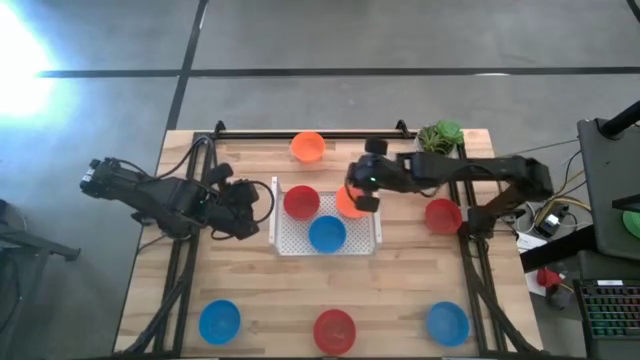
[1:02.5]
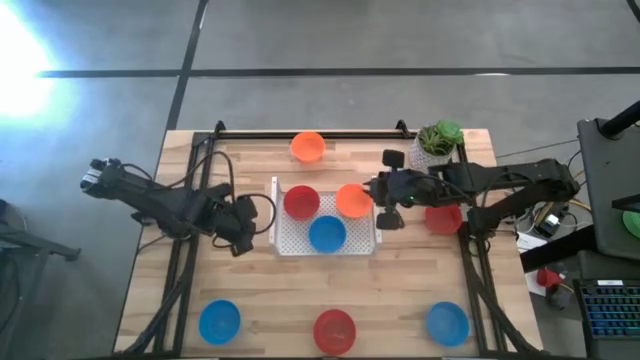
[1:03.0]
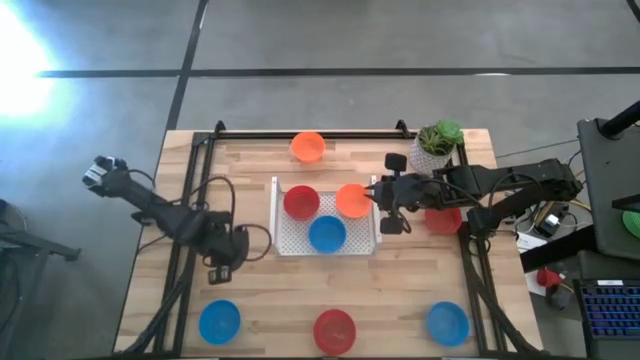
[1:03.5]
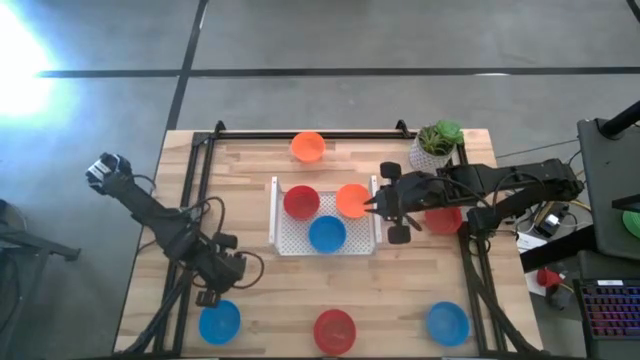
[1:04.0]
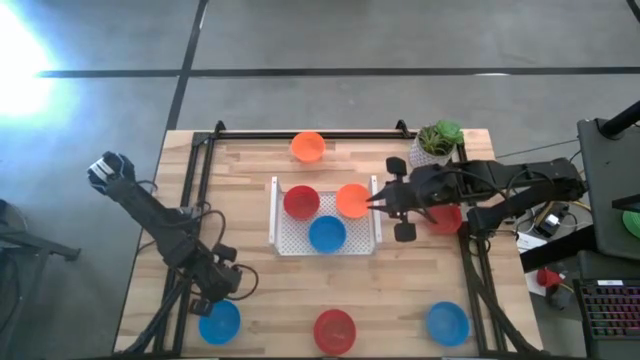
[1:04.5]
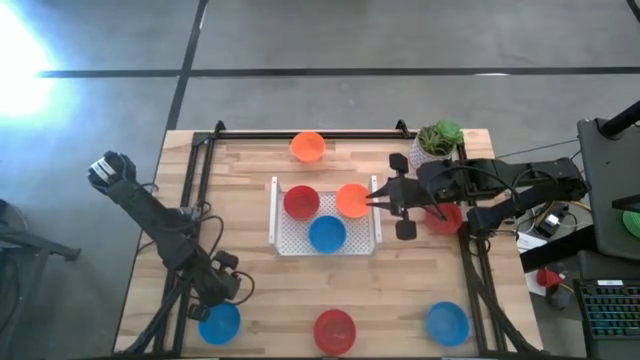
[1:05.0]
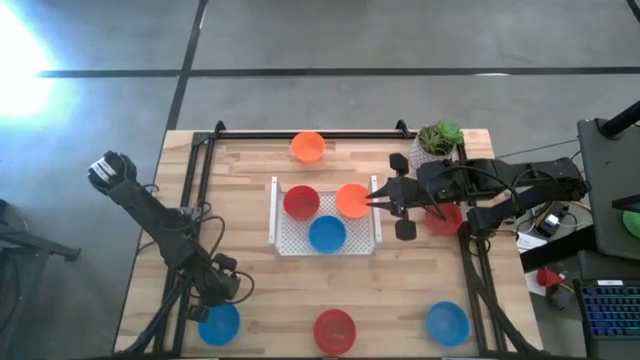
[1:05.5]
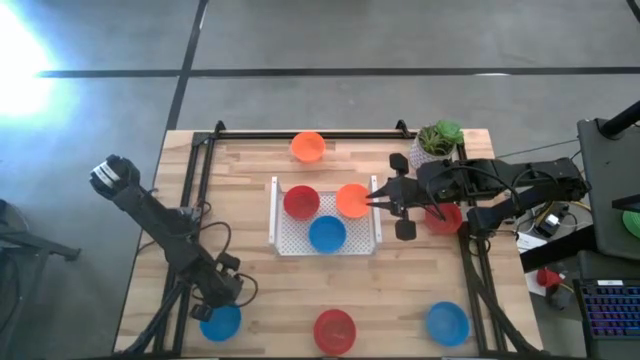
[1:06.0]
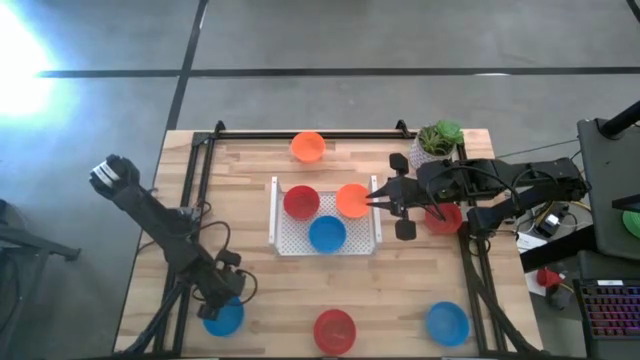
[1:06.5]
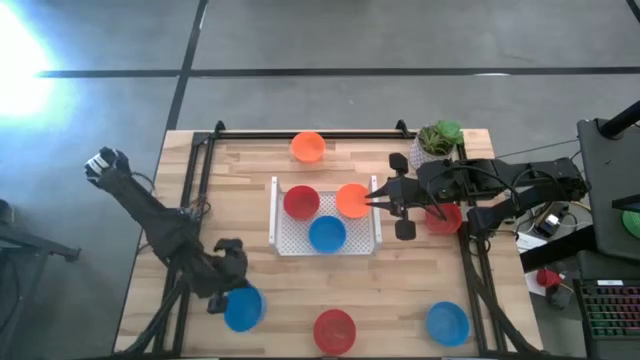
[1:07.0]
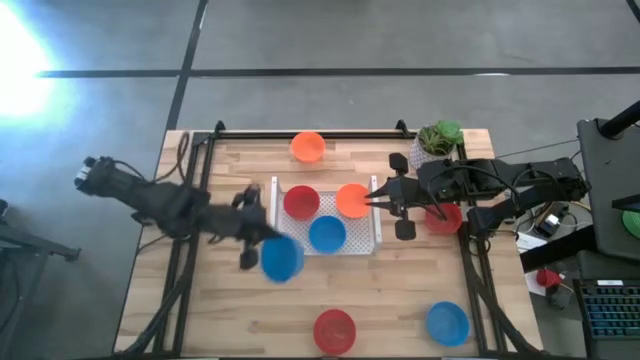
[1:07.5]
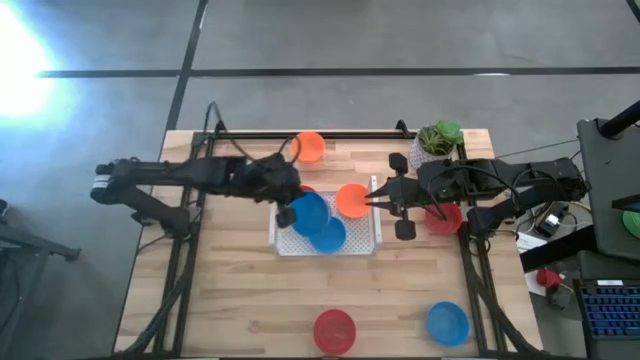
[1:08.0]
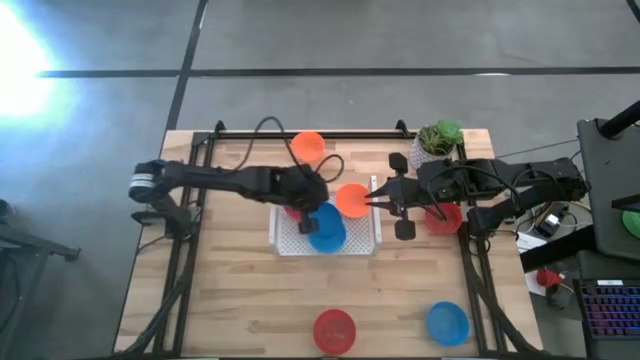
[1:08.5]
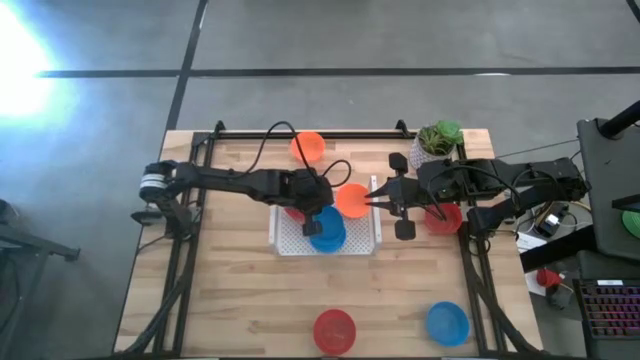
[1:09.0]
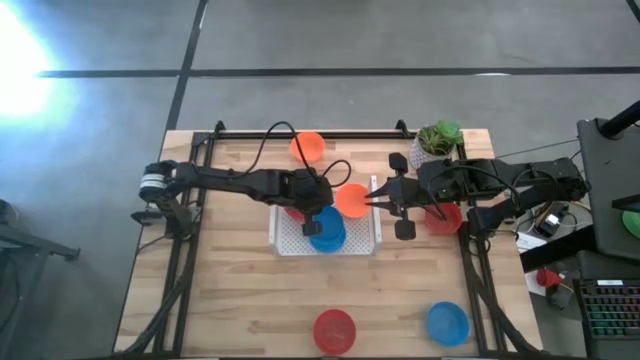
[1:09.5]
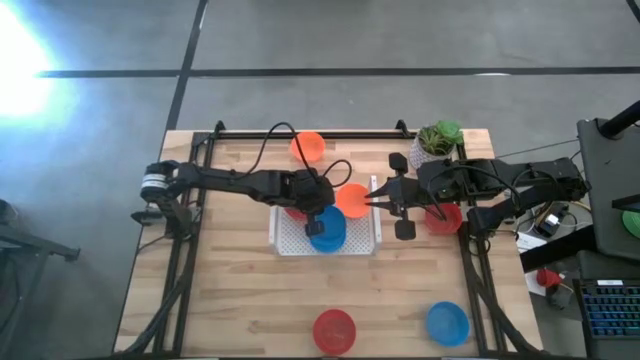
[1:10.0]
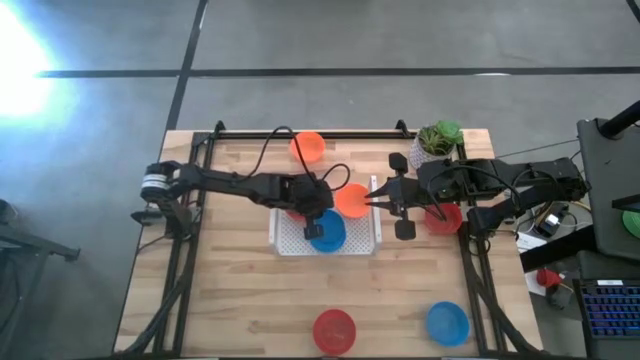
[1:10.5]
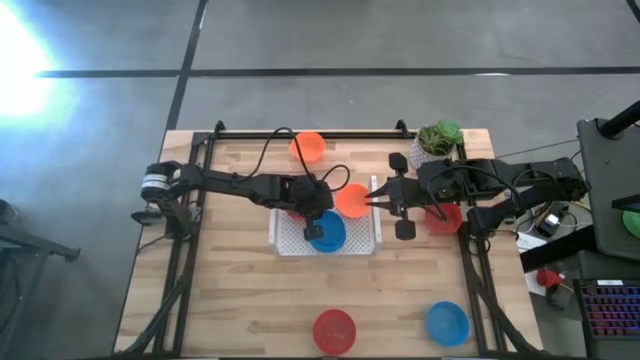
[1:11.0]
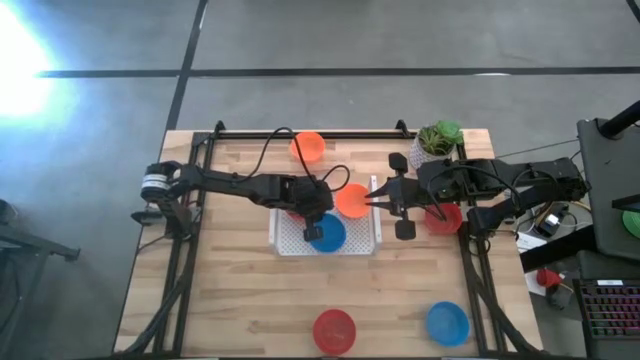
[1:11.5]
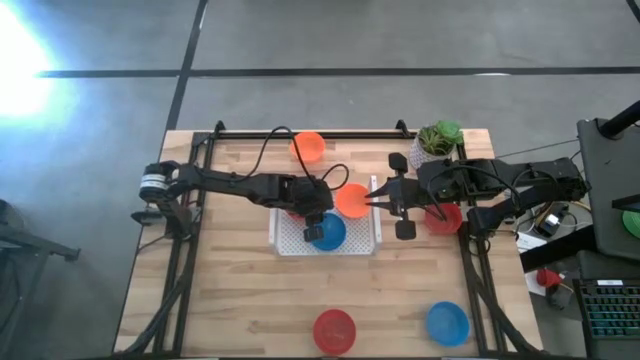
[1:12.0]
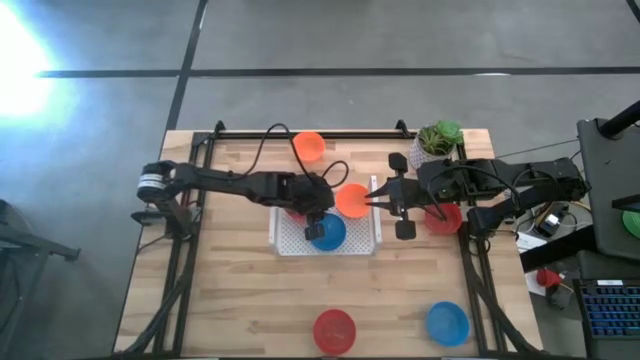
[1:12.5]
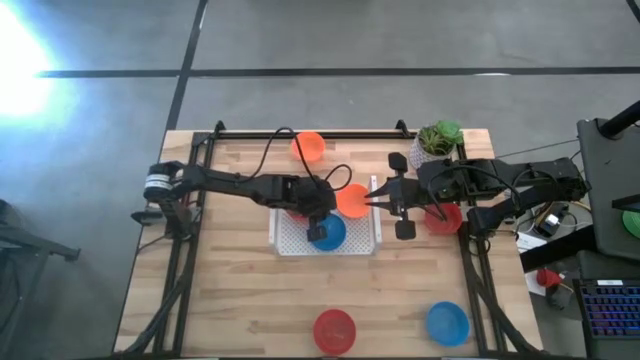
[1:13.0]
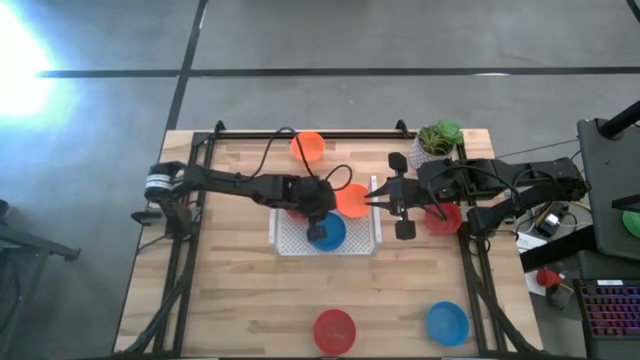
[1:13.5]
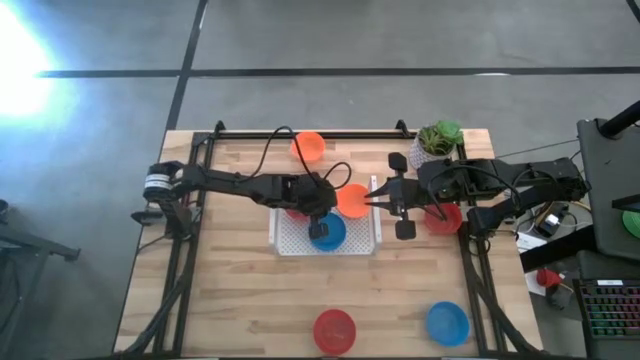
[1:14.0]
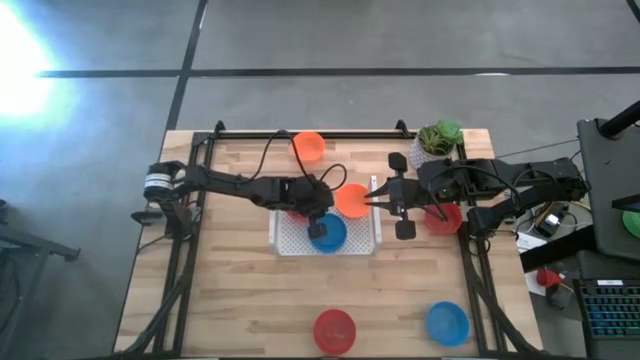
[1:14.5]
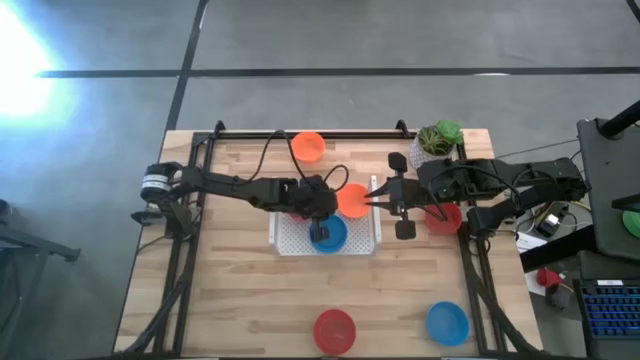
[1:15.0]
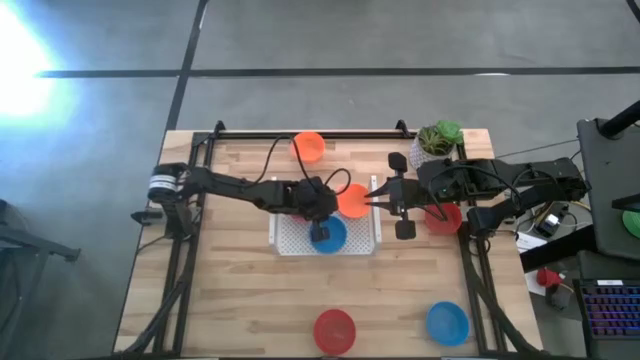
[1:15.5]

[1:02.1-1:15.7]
Task: Pick & Place Mini bowls
Stack the left blue bowl on top of the blue bowl on the shelf

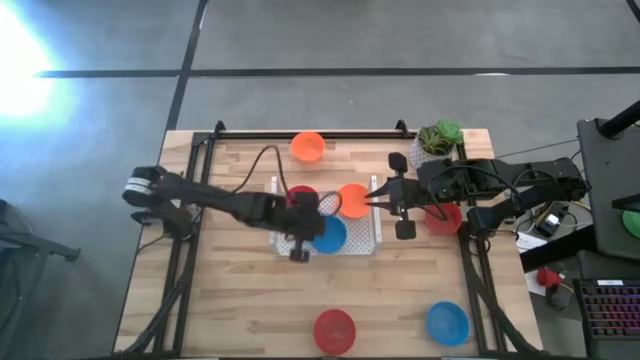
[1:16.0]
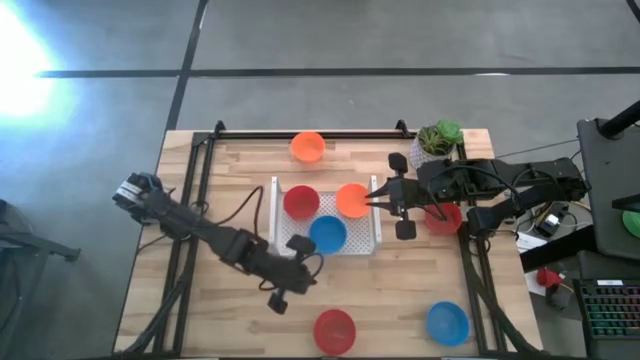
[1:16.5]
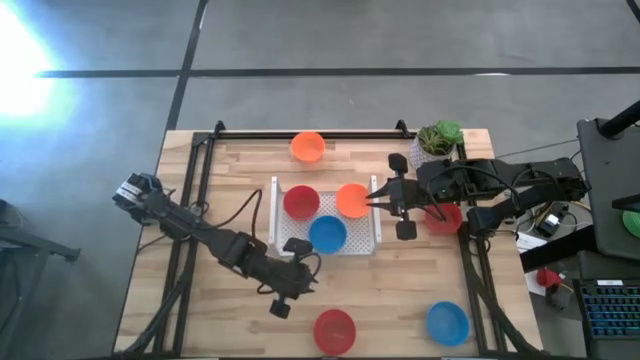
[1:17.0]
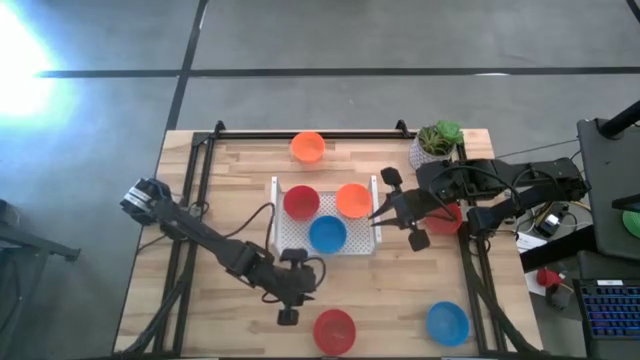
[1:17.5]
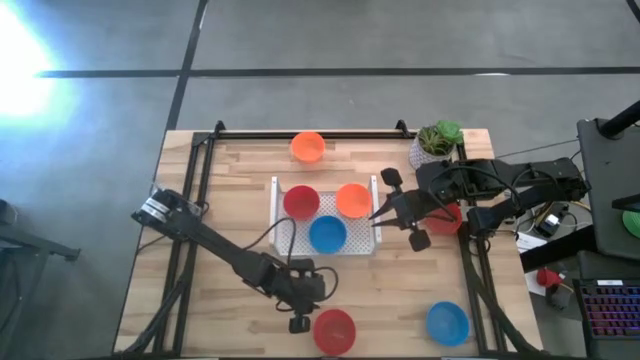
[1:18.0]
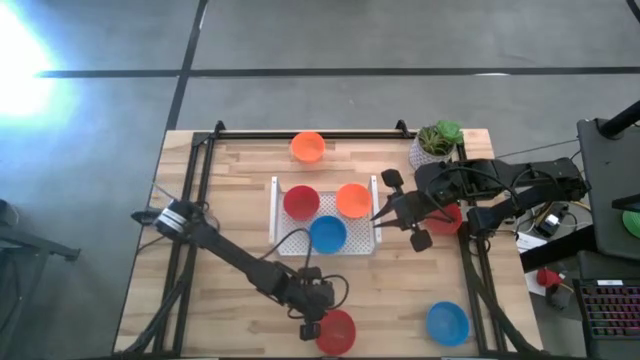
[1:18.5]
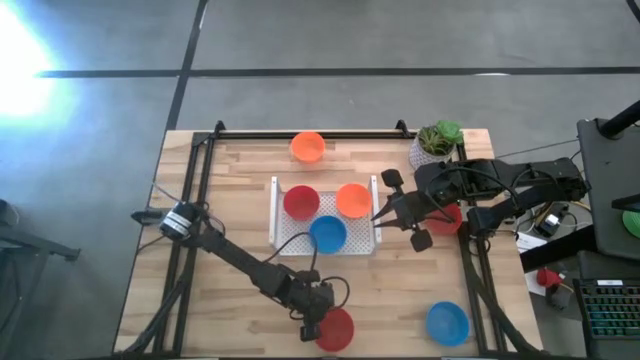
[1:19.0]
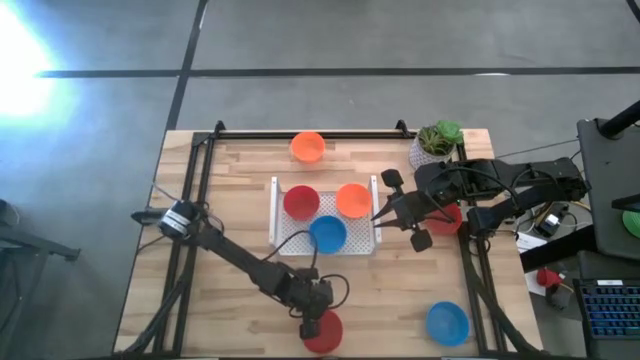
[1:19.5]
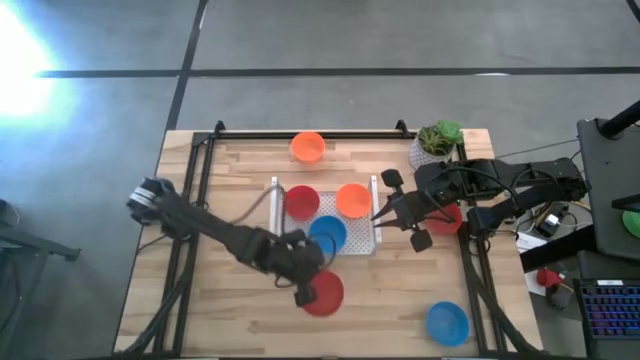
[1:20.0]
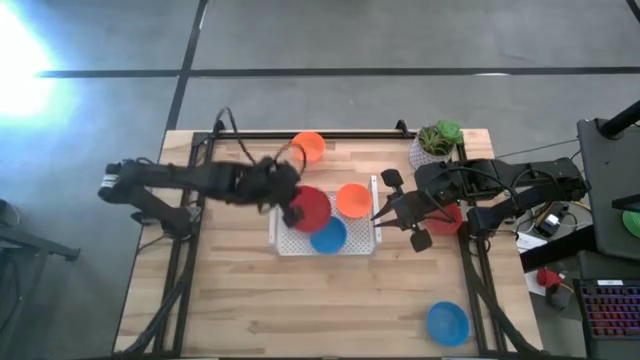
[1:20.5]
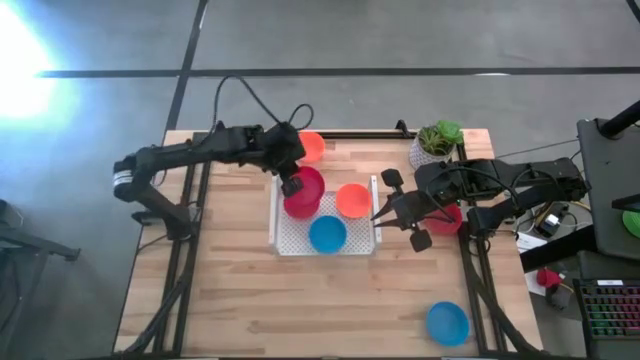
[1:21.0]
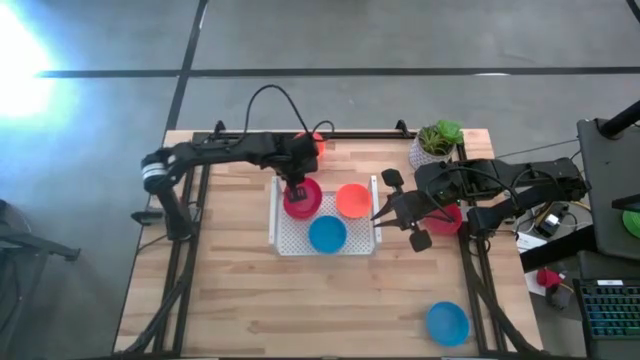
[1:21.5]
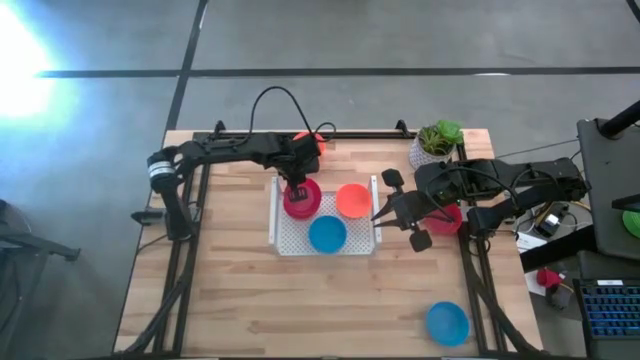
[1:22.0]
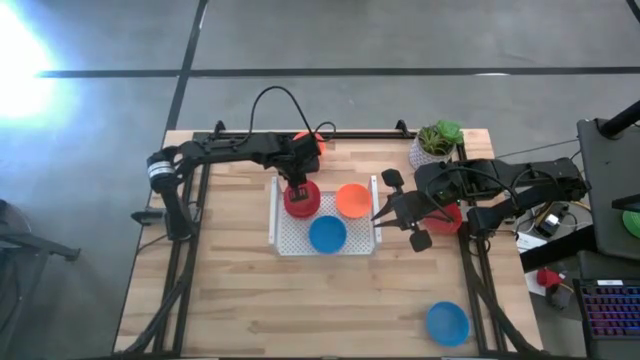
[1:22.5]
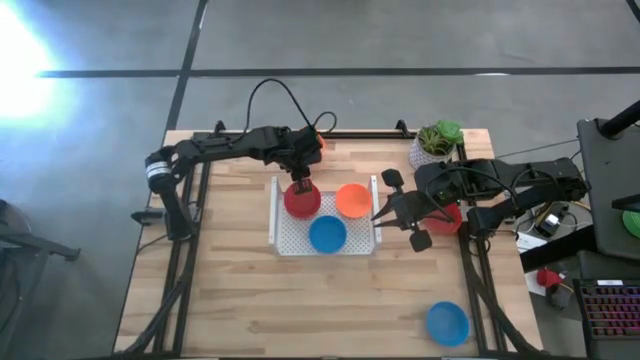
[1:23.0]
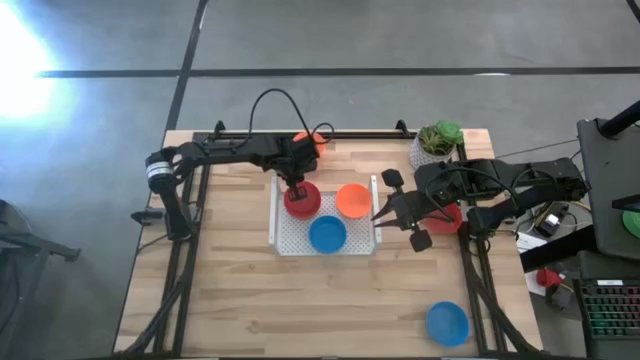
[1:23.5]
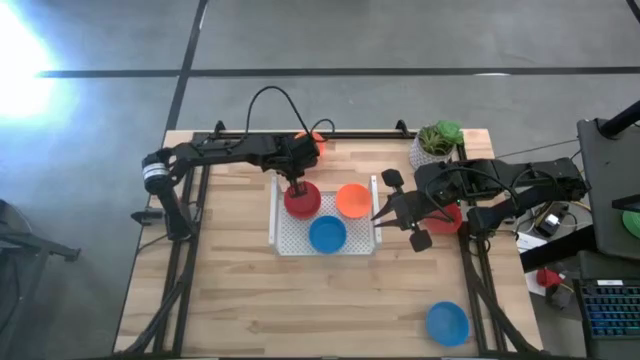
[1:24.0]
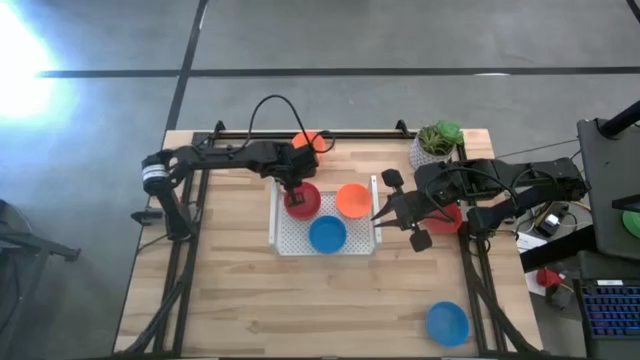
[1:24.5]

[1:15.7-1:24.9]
Stack the bottom red bowl on top of the red bowl on the shelf
